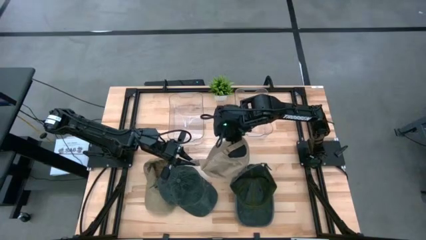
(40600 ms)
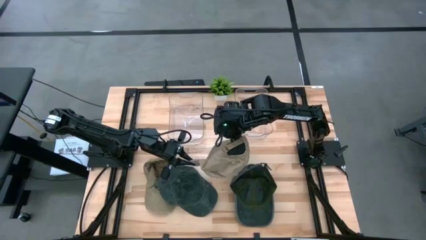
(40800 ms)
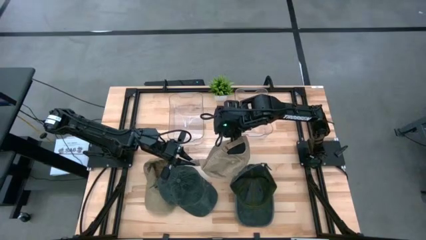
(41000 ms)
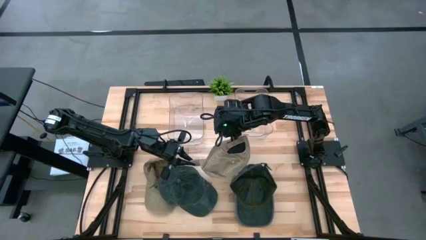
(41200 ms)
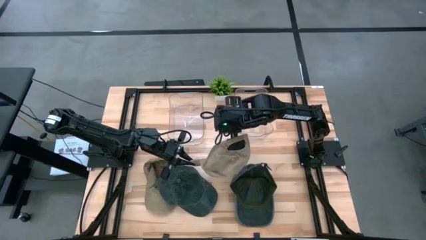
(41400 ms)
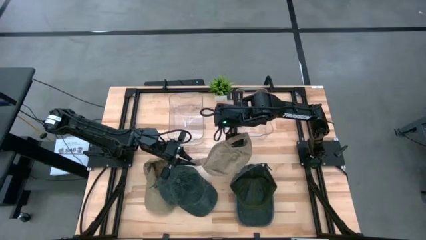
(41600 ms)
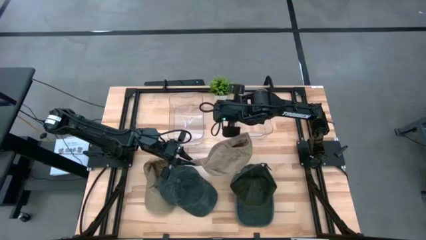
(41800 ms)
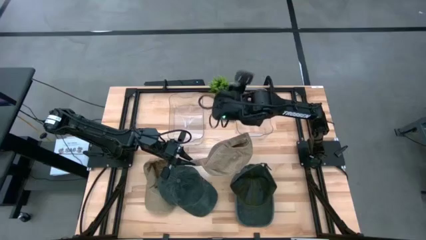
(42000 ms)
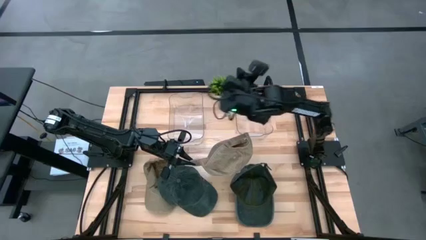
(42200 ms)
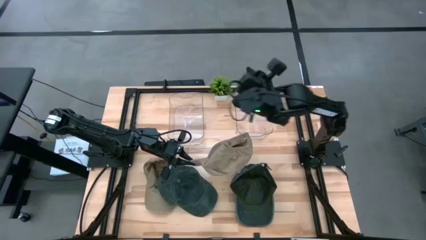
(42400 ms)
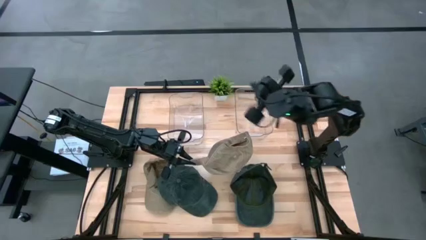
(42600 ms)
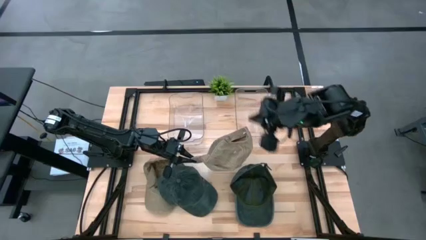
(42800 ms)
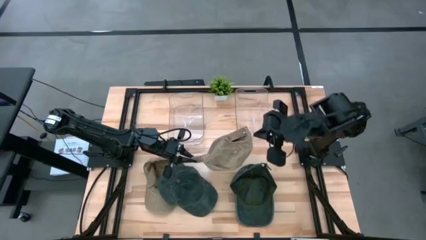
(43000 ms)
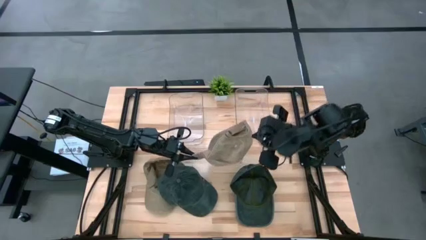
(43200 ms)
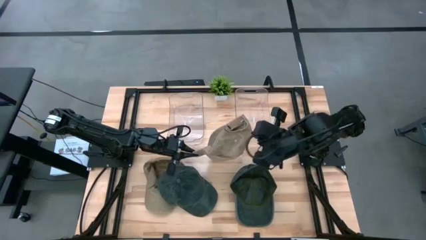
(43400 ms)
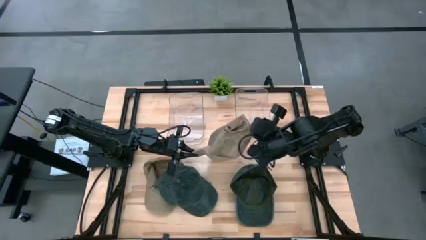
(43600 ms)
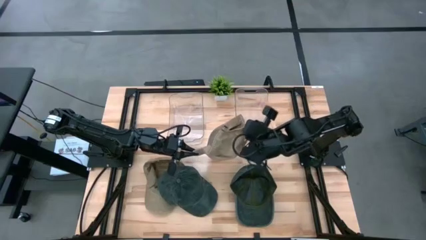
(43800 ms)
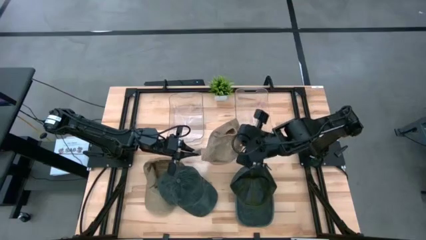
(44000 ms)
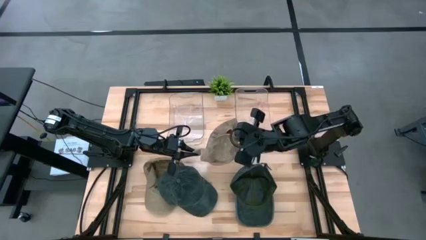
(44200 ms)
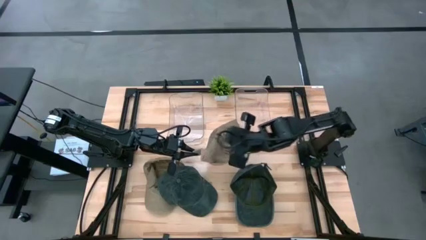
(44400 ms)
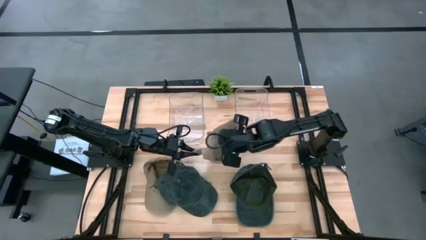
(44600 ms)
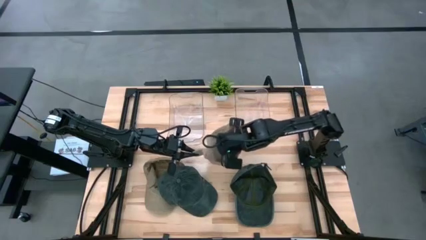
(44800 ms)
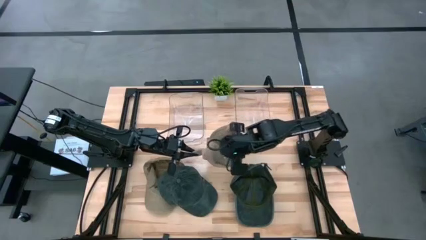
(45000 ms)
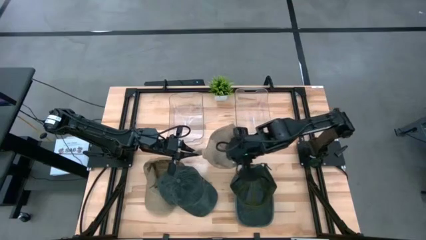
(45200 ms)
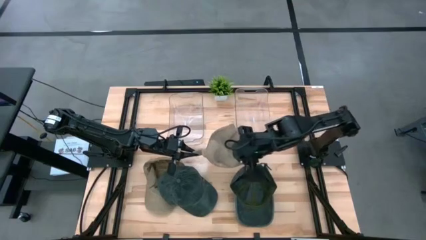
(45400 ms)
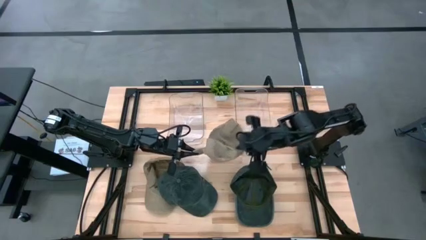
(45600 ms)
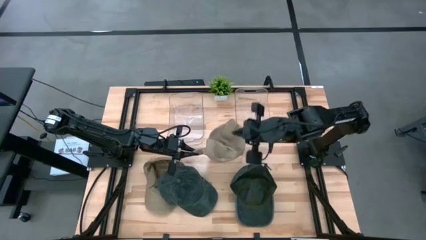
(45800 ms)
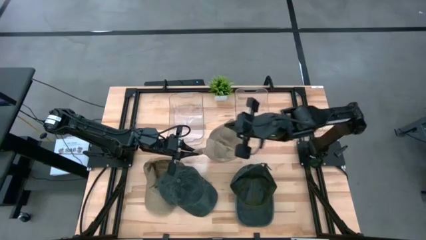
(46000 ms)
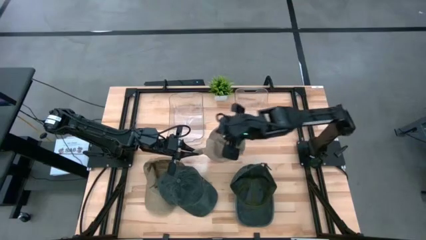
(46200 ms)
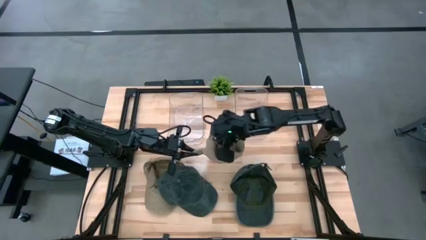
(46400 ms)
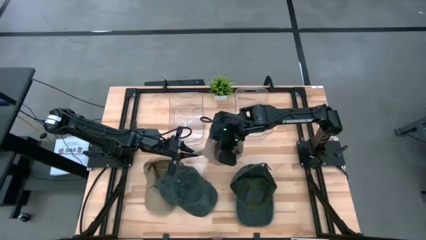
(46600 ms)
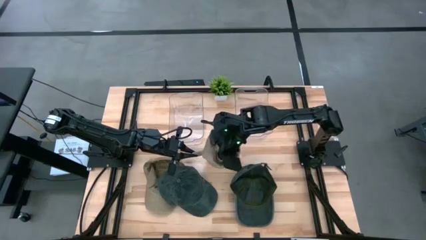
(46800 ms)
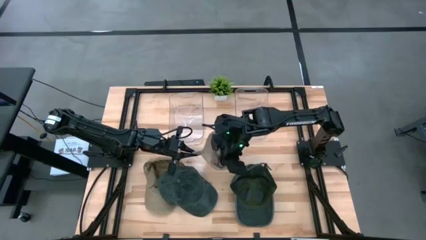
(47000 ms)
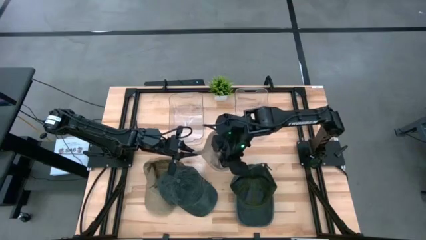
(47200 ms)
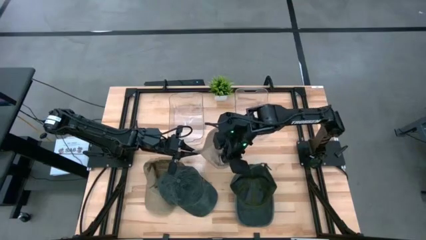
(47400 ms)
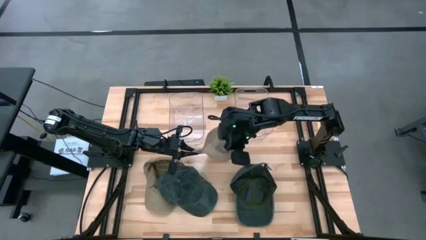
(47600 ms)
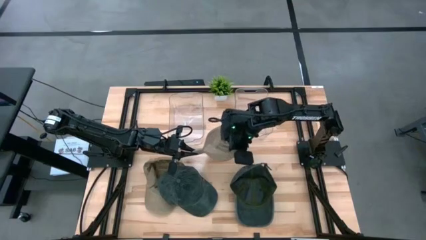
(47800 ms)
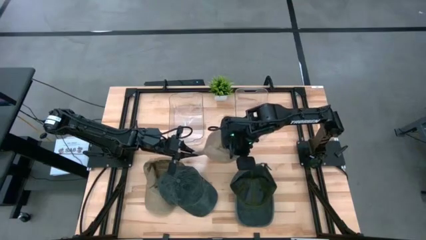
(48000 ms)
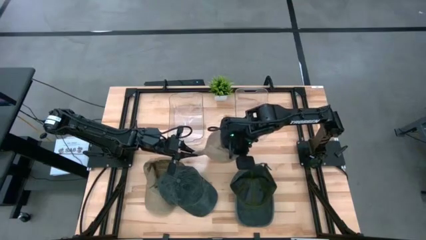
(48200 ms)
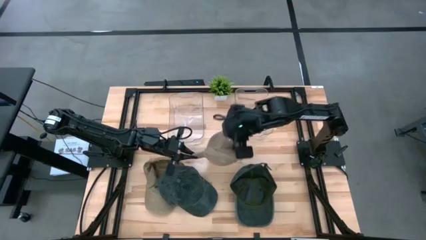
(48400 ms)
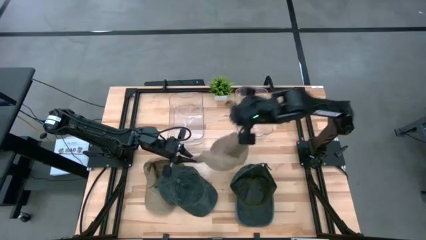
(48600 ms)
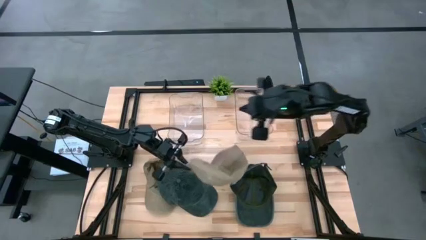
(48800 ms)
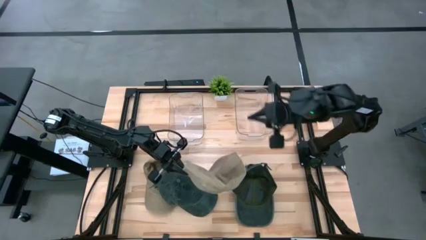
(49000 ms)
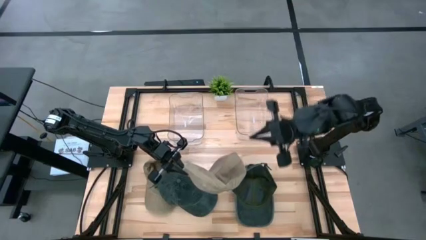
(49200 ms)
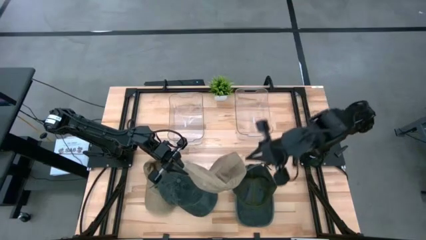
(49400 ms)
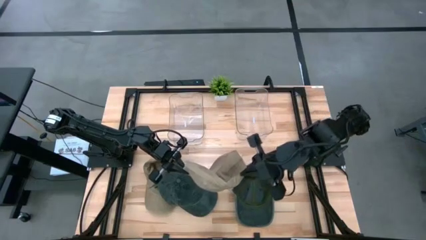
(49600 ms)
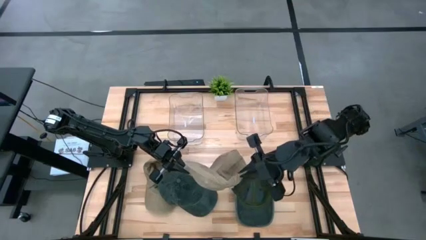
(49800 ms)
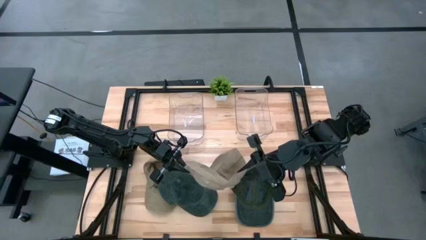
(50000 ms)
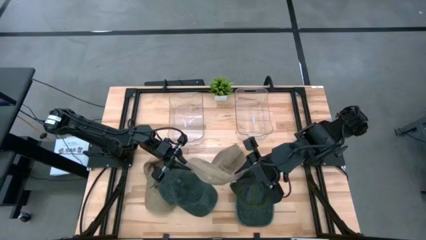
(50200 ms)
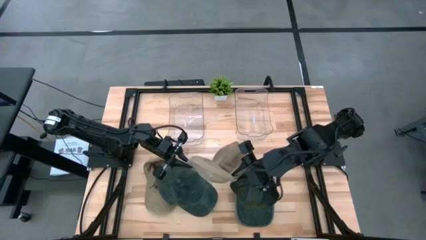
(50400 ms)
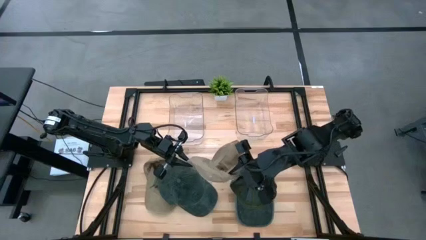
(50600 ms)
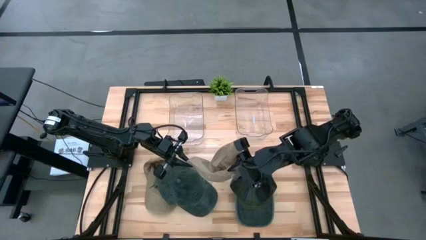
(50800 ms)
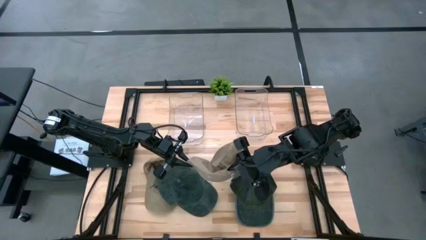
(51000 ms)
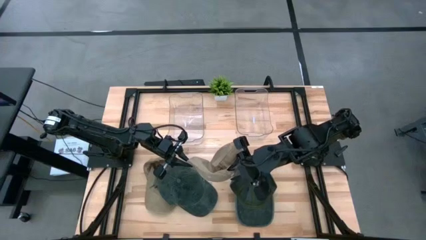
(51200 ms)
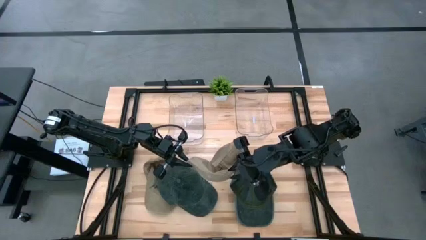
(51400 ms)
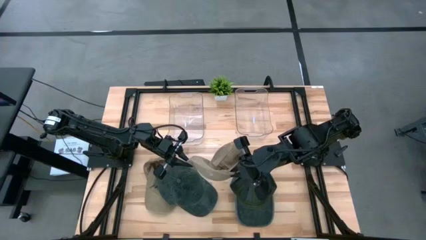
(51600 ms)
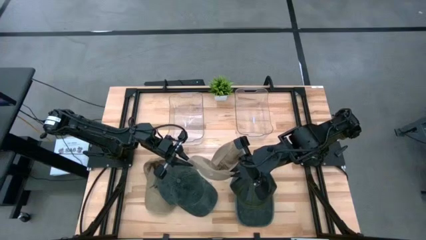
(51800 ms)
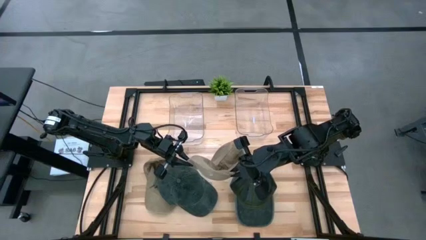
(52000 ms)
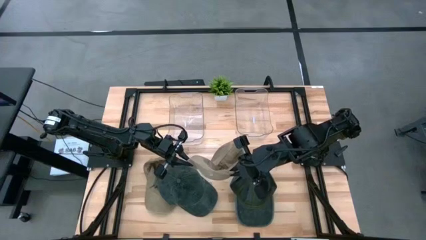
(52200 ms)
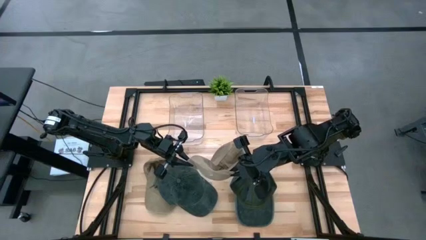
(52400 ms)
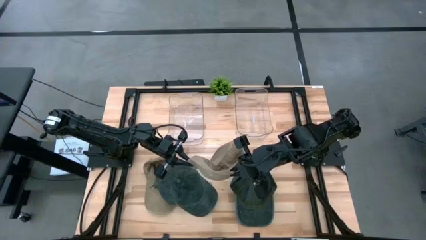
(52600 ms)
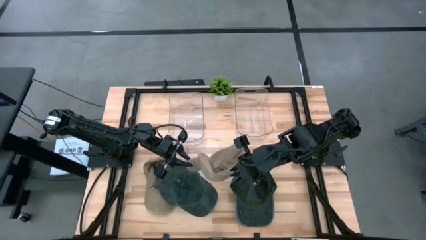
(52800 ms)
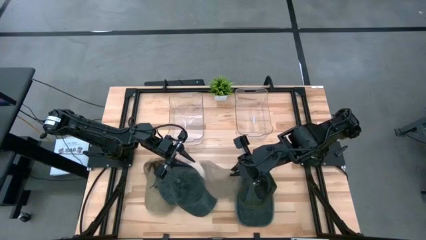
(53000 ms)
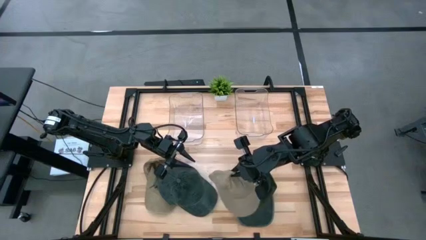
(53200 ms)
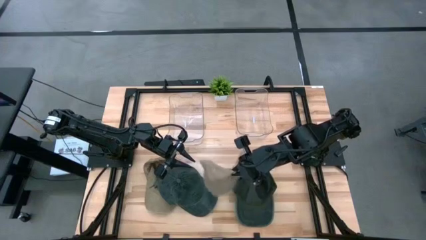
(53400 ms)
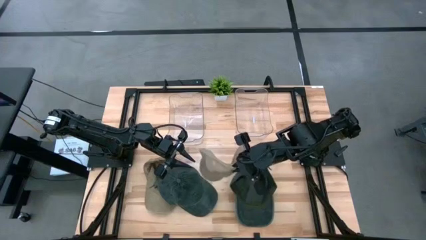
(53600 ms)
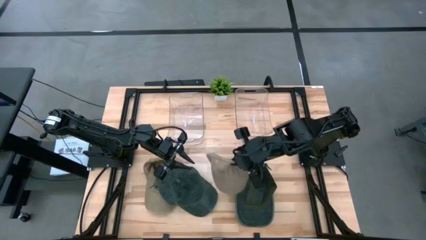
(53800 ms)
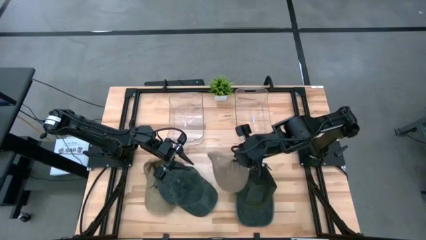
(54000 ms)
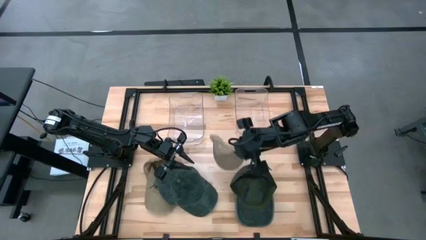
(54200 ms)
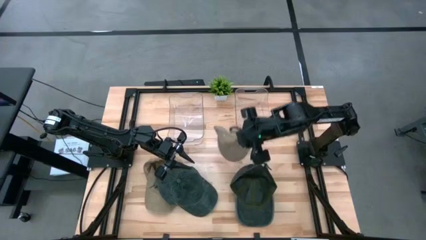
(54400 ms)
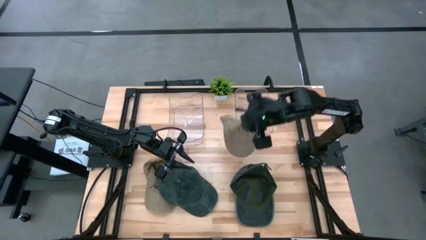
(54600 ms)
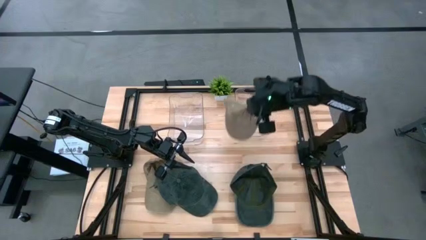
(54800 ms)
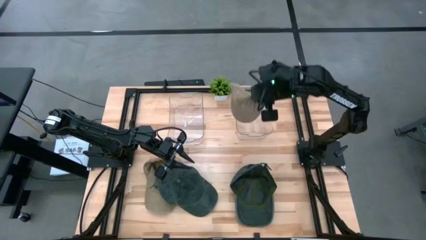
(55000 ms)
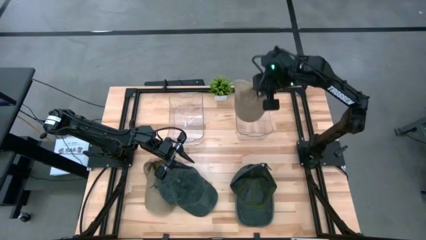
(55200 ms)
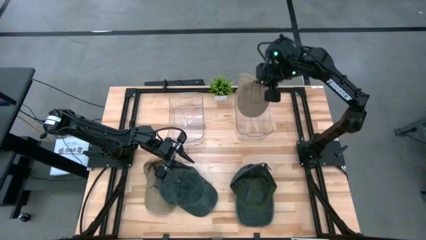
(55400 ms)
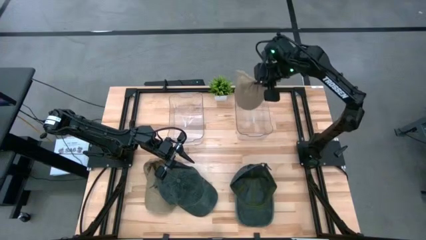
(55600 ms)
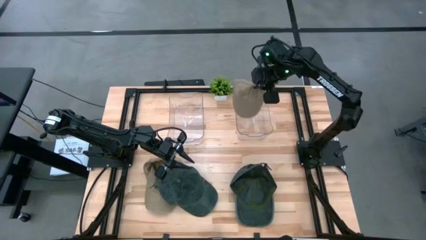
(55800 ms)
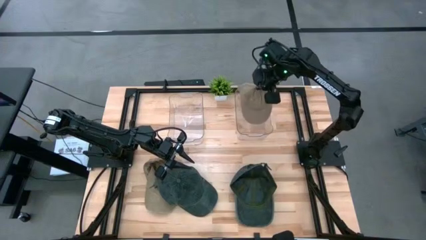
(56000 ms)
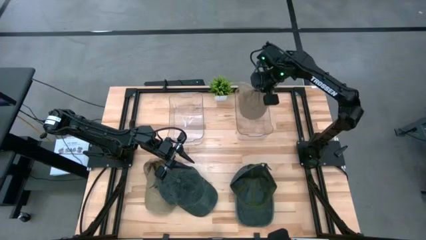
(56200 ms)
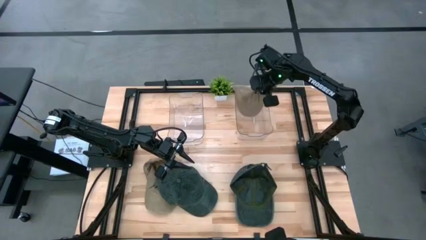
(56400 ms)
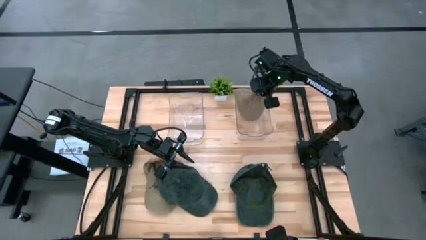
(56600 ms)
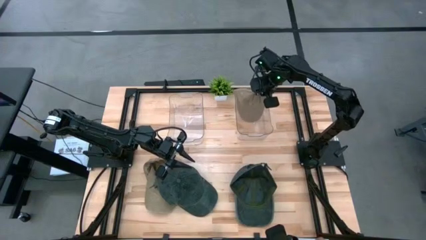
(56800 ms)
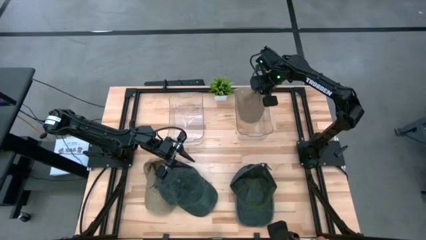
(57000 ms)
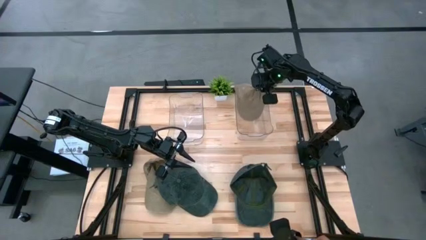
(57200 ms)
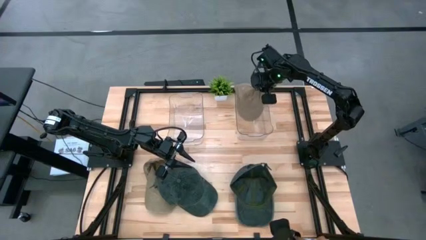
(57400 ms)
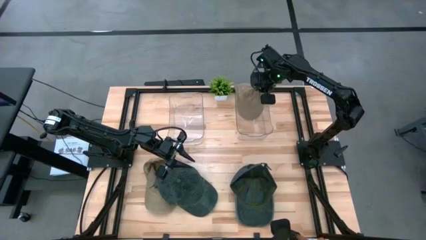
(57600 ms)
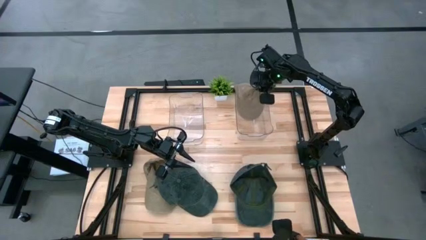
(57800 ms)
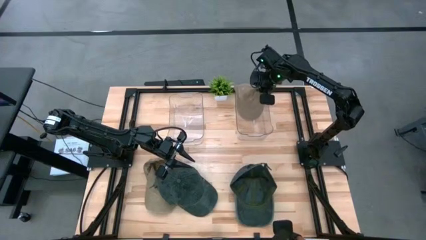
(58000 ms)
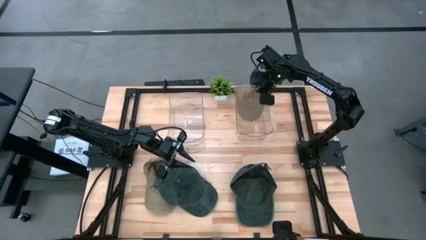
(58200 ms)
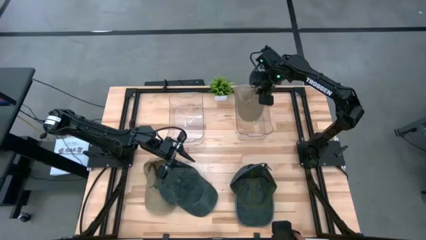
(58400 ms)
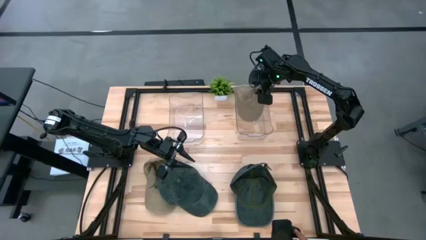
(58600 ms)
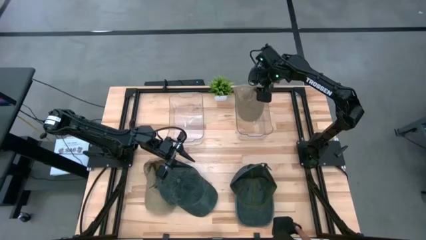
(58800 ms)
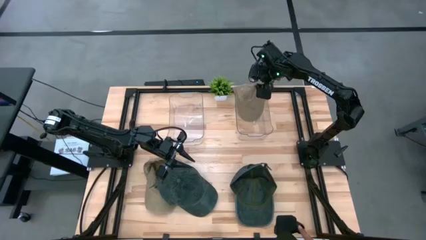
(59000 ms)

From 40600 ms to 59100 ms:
Task: Pick & Place hat
Put the top brown cap into the right transparent bin
